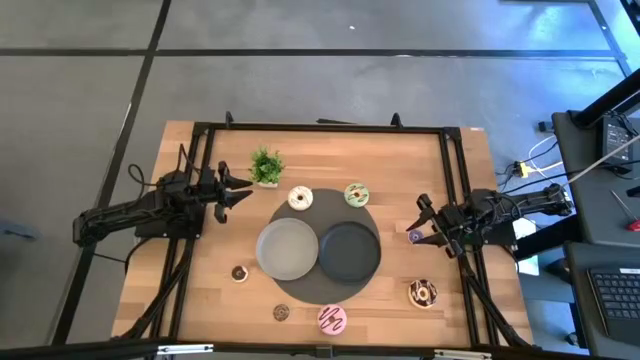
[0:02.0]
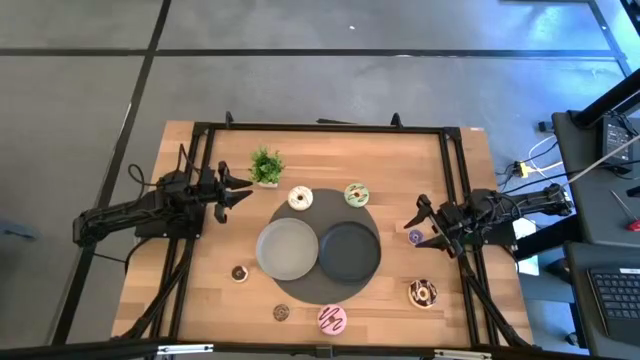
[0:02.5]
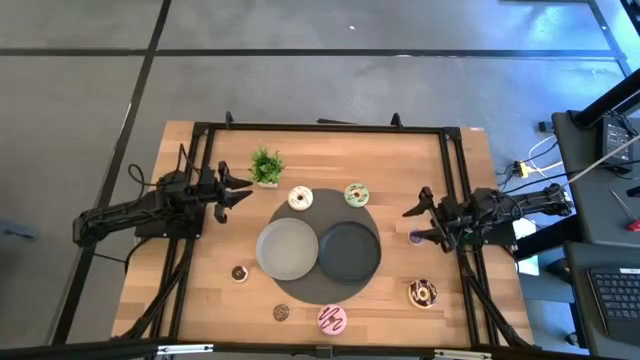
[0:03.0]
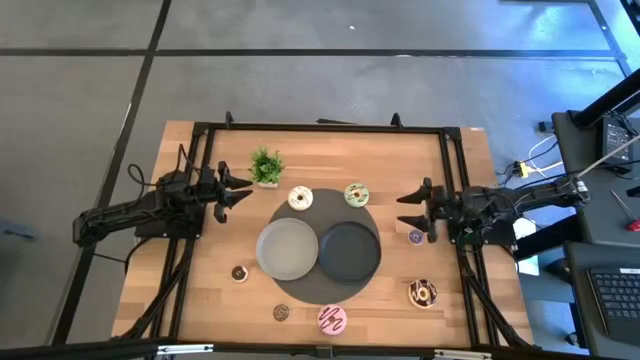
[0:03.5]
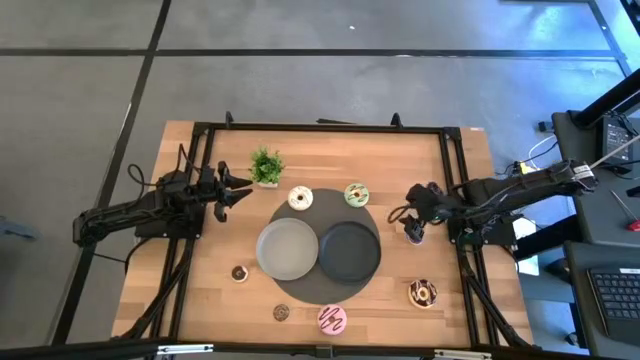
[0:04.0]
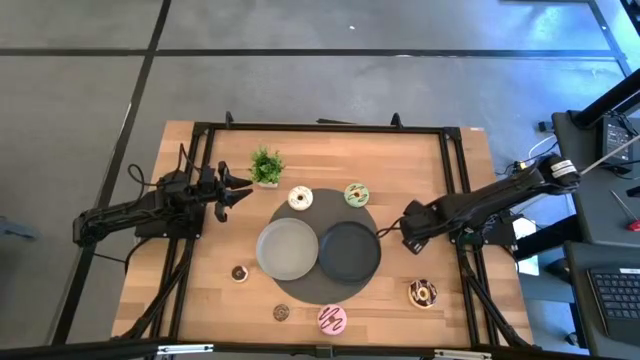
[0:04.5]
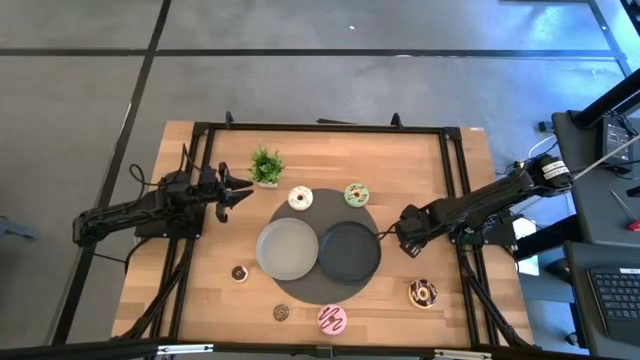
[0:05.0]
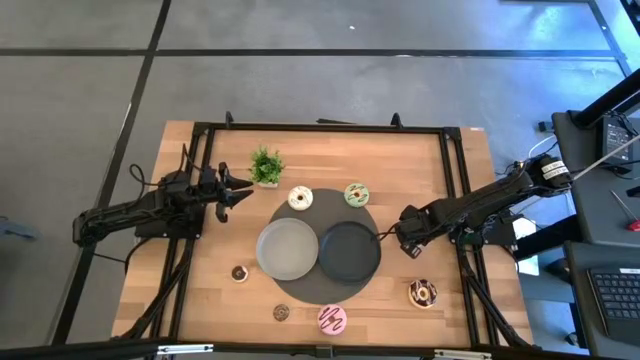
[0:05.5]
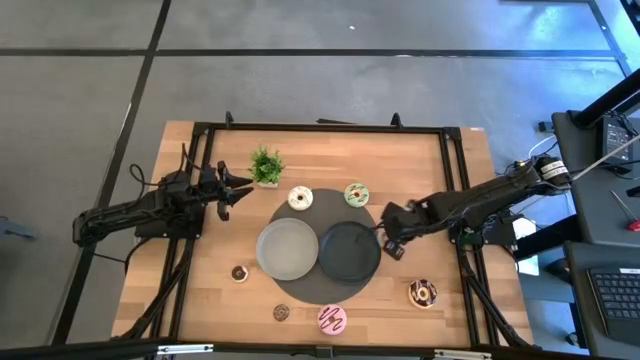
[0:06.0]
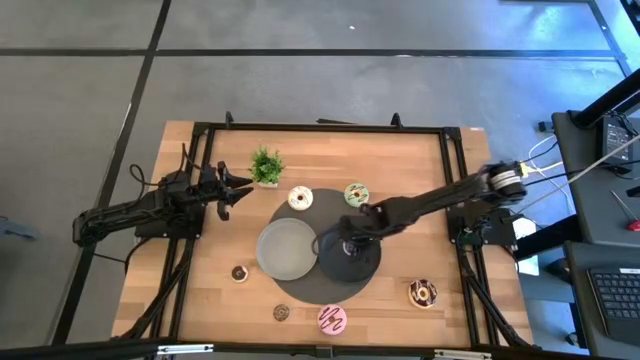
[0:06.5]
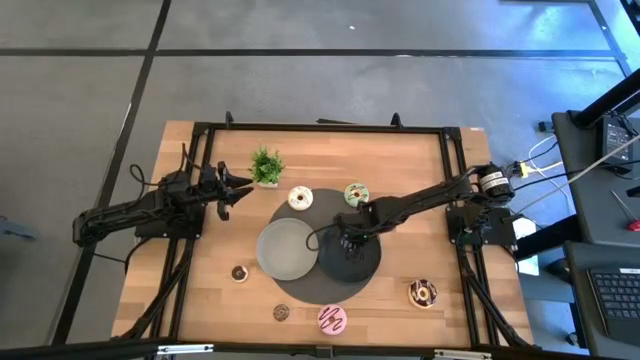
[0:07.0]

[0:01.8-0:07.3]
Task: Pick & Place donuts
Put the small purple donut on the black plate

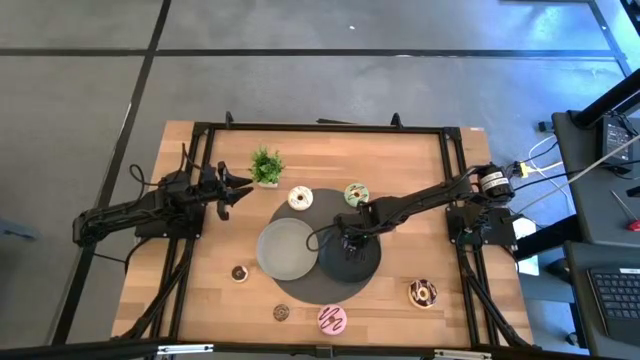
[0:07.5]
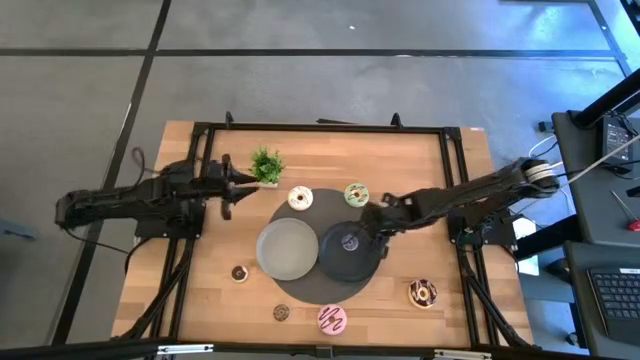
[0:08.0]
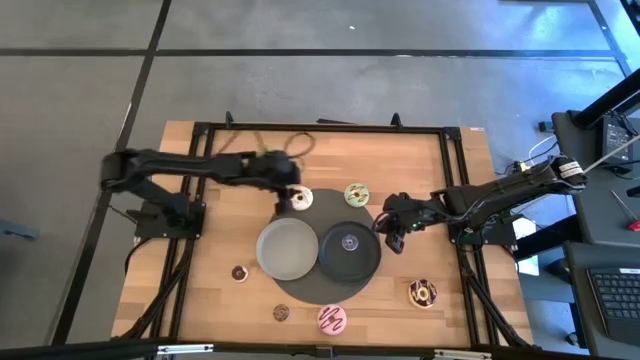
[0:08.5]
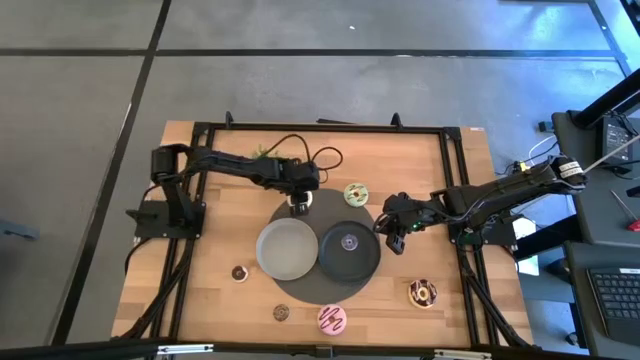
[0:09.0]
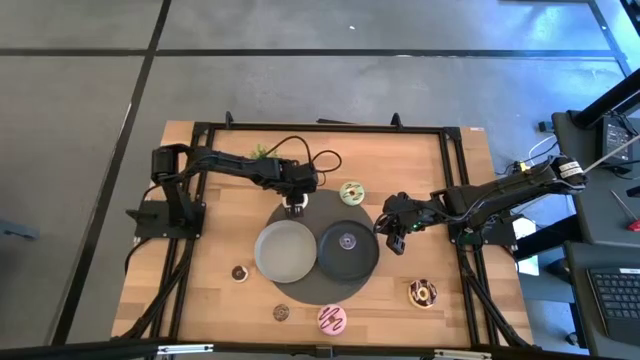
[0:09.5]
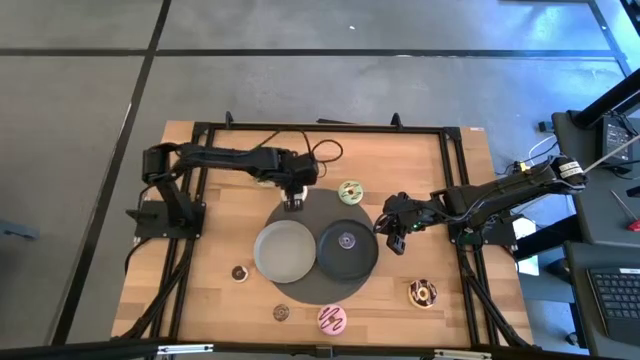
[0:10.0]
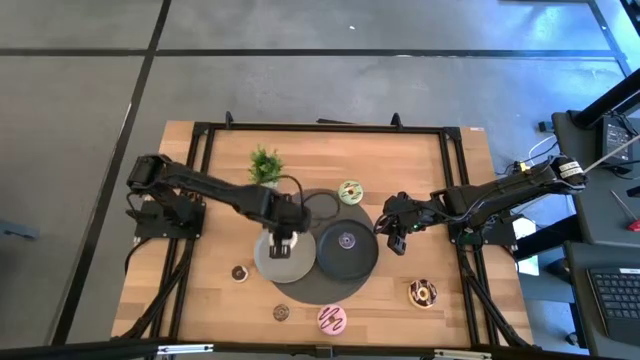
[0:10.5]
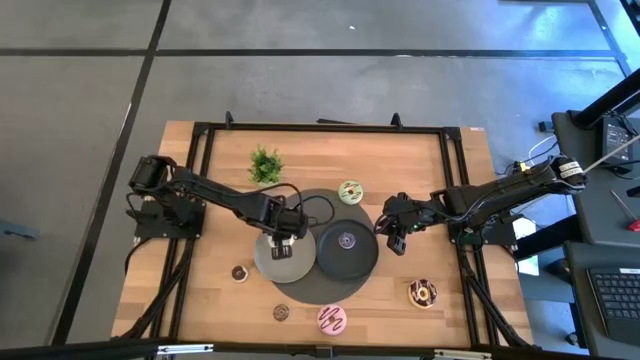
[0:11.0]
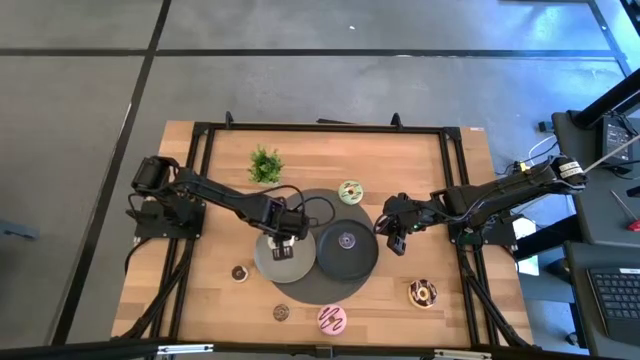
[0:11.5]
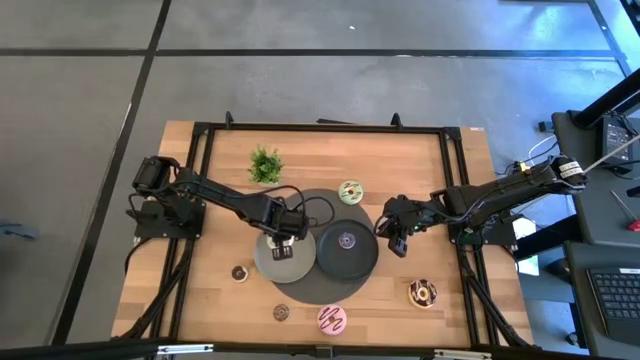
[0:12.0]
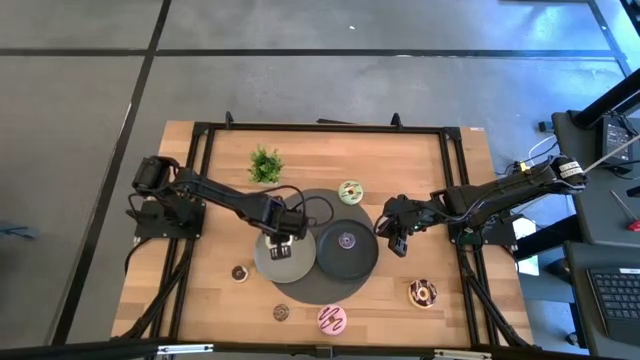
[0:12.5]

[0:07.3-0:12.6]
Put the large white donut on the gray plate

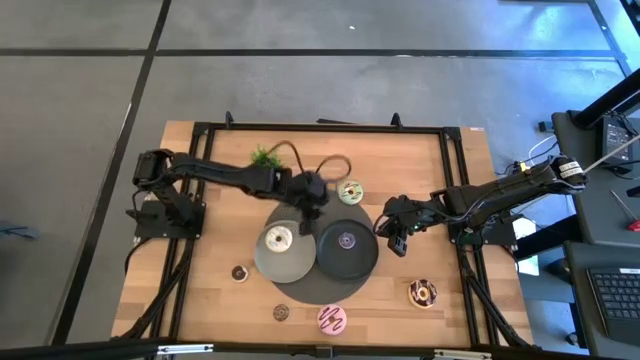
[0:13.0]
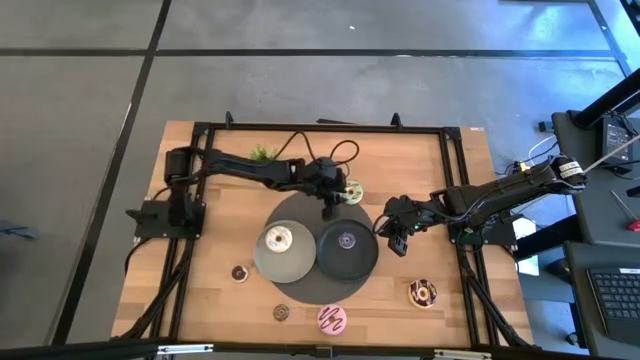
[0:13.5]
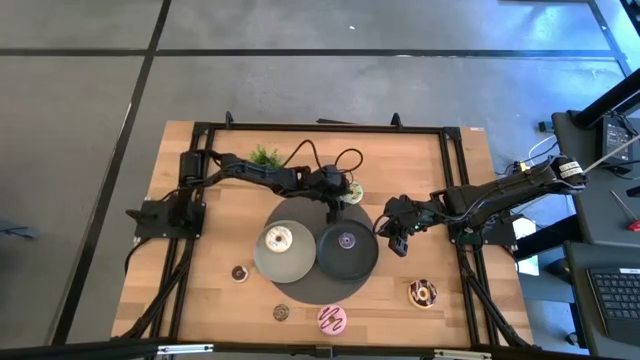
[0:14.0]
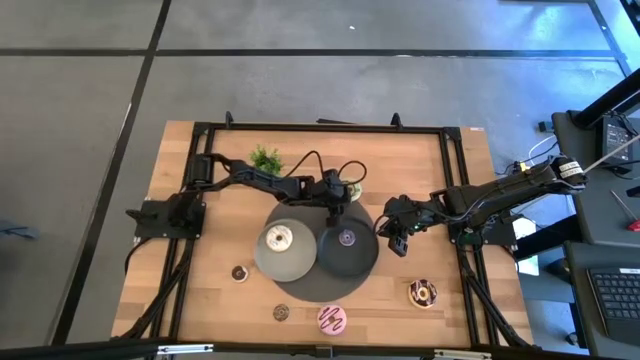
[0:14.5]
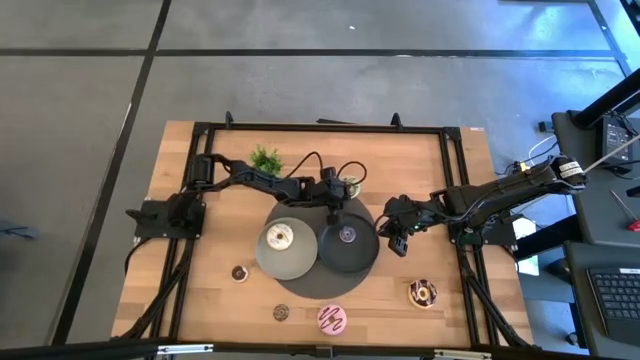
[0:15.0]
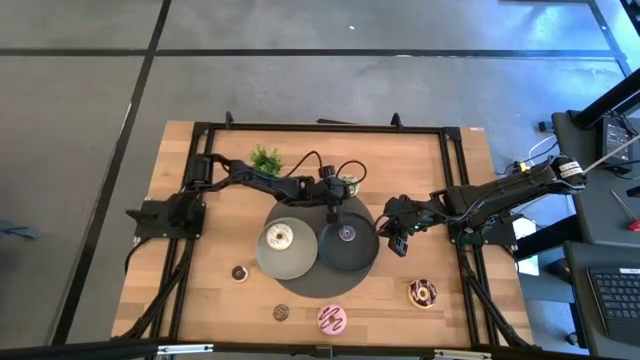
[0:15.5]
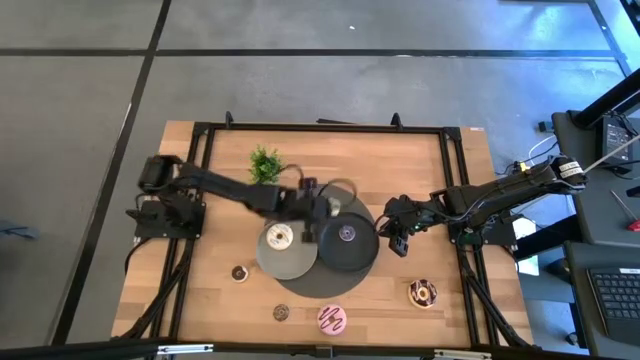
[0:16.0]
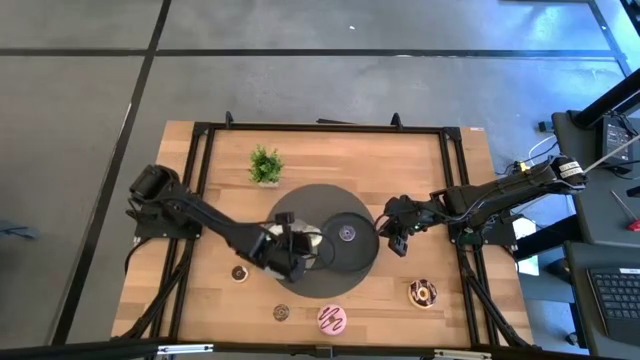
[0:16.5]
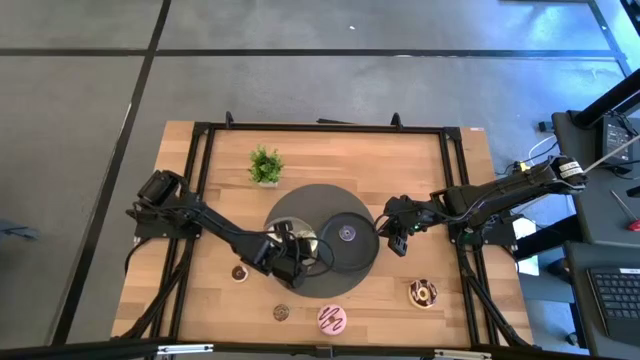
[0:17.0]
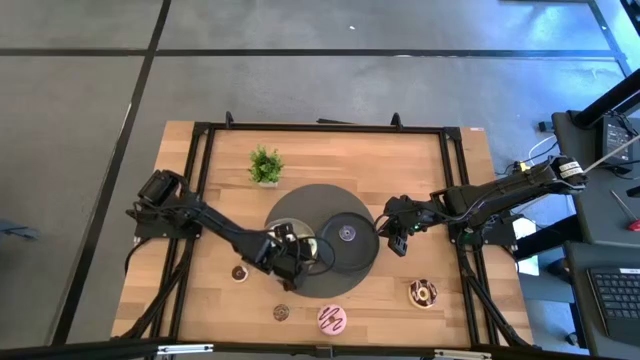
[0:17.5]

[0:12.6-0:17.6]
Put the large green donut on the gray plate

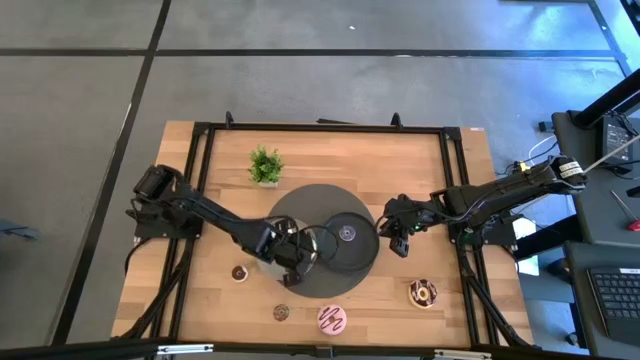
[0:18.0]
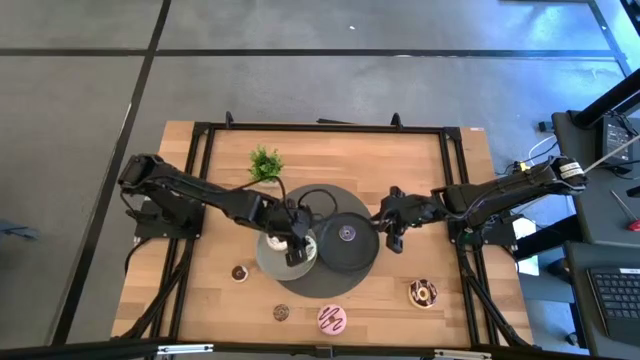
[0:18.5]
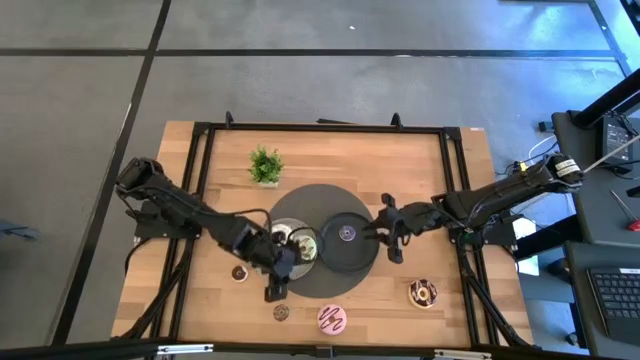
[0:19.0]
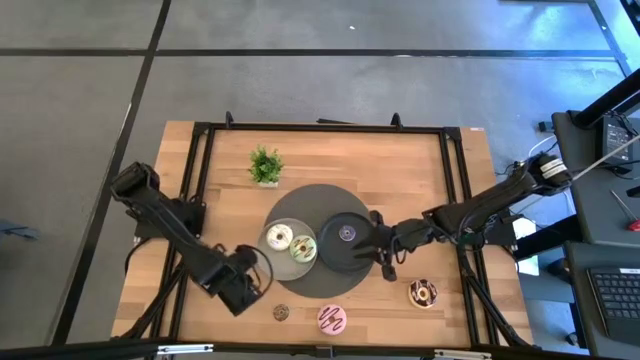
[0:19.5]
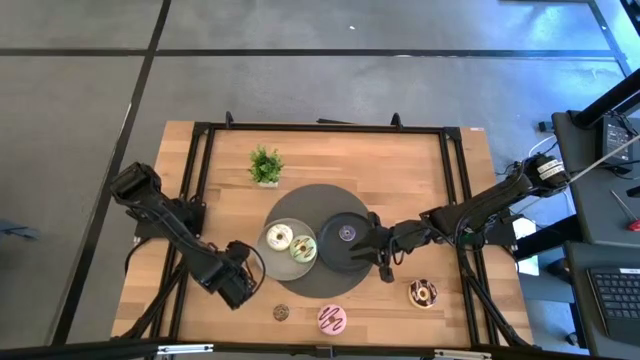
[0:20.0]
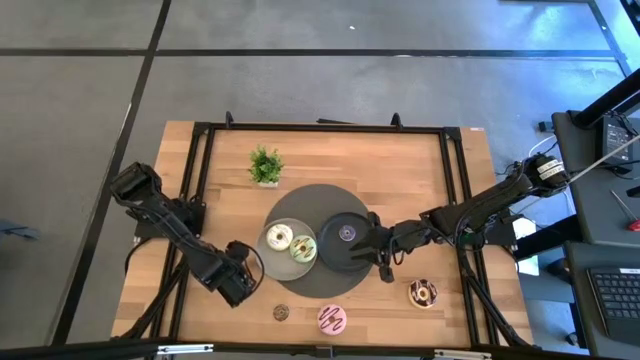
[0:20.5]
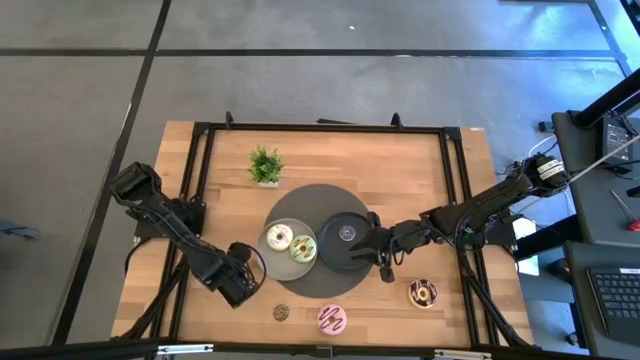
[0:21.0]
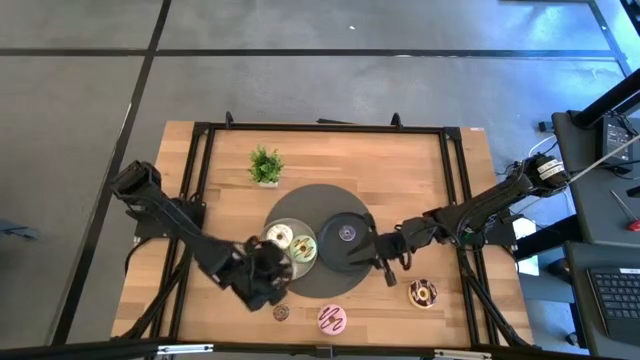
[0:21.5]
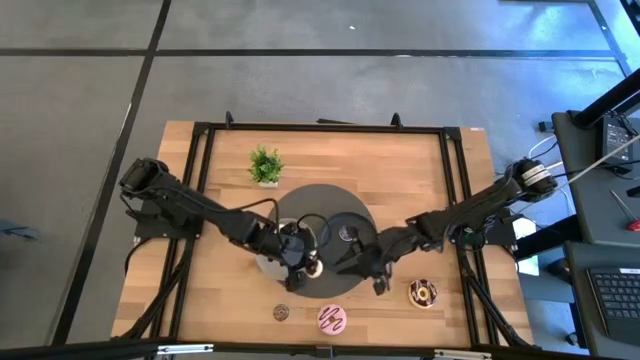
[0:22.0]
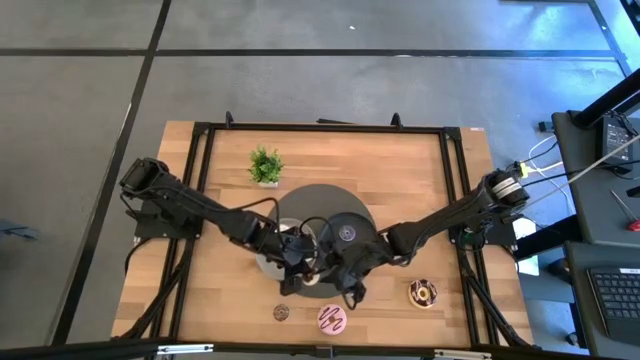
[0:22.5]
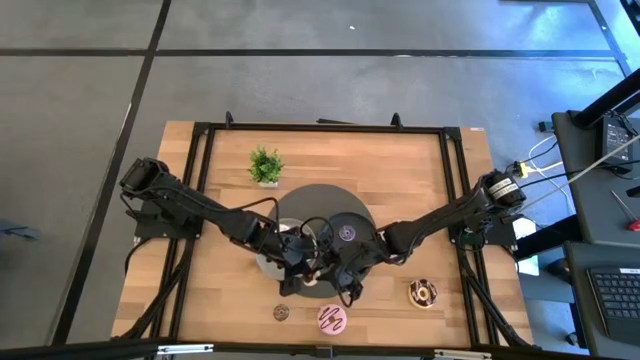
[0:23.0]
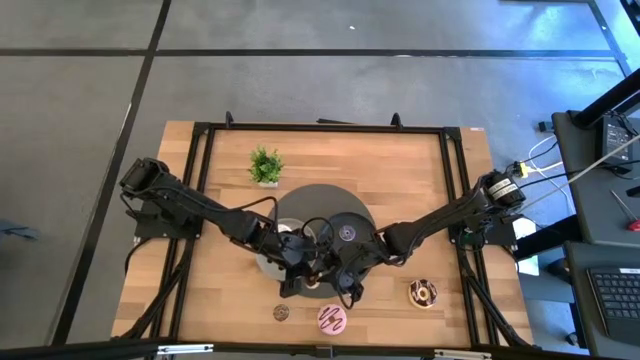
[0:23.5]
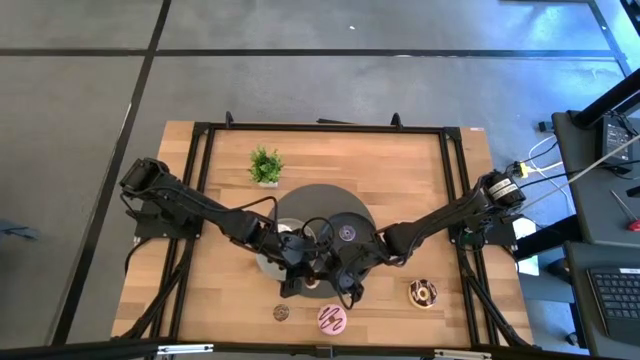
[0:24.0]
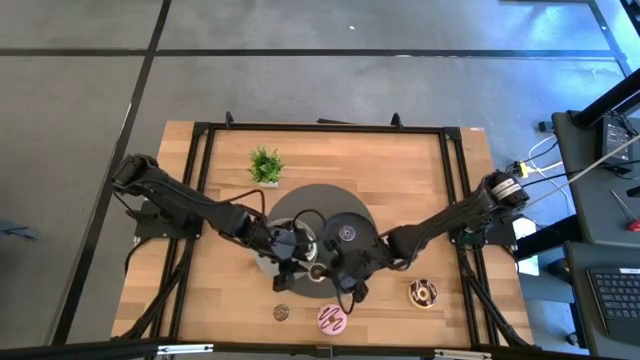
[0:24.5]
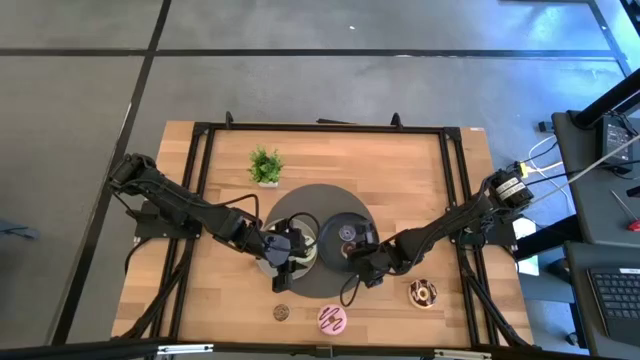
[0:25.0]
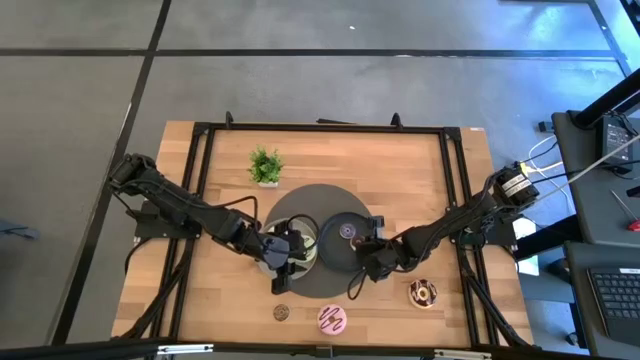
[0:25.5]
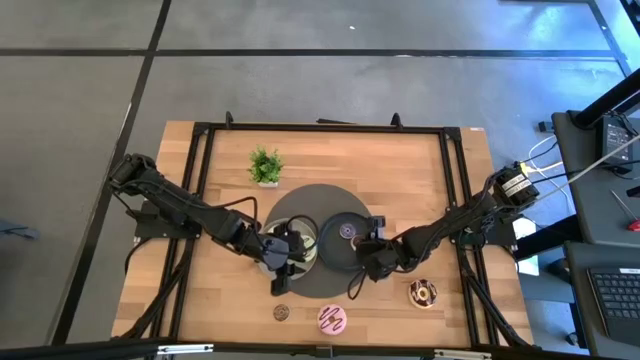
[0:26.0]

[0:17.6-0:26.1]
Put the small black donut on the black plate
